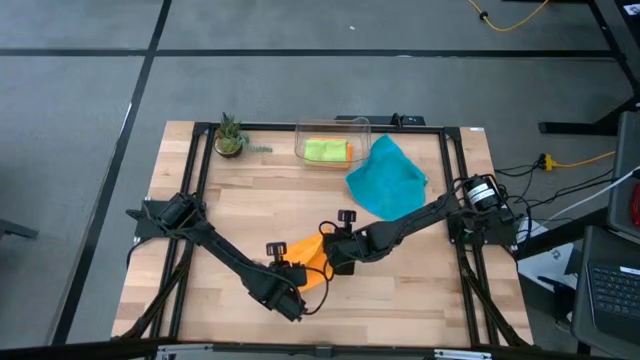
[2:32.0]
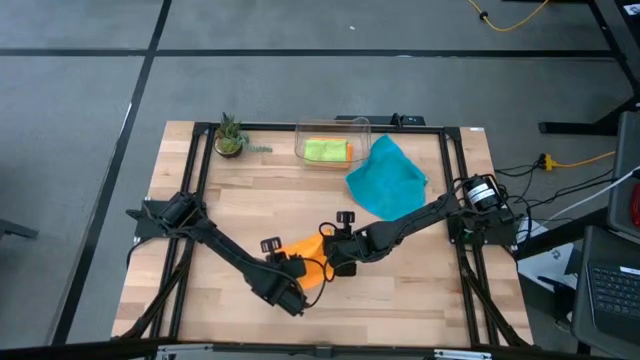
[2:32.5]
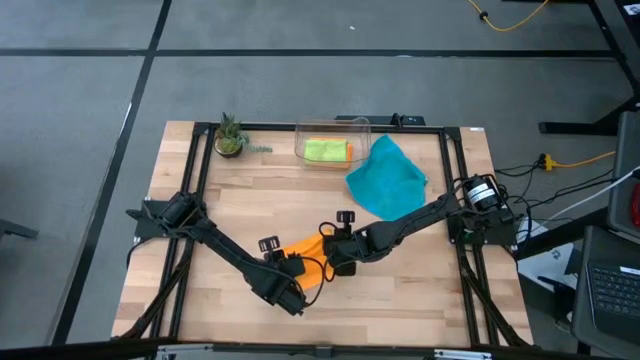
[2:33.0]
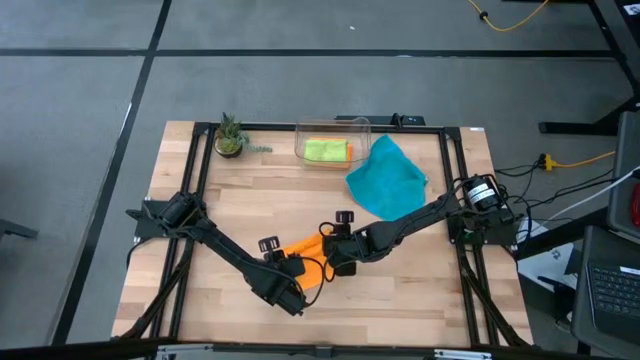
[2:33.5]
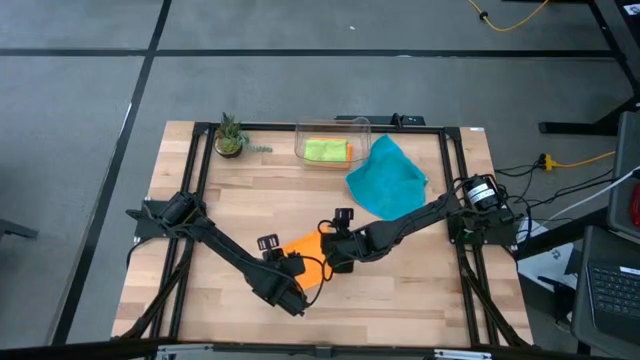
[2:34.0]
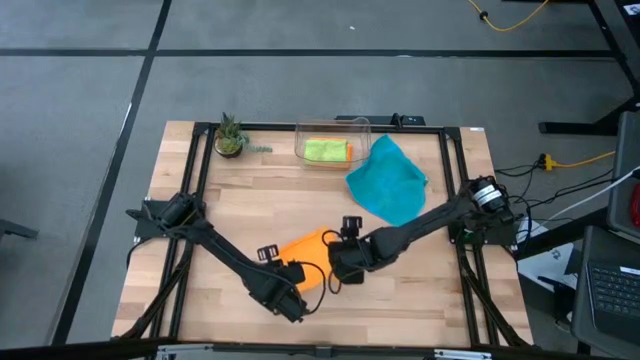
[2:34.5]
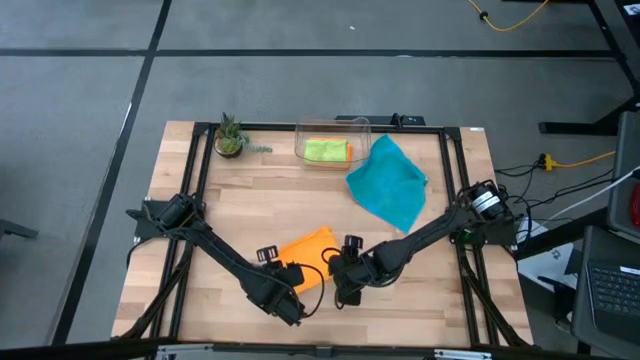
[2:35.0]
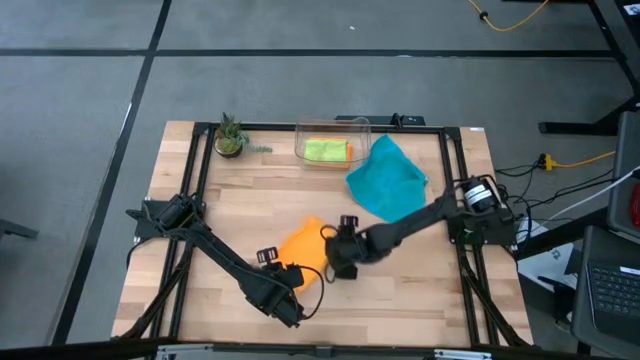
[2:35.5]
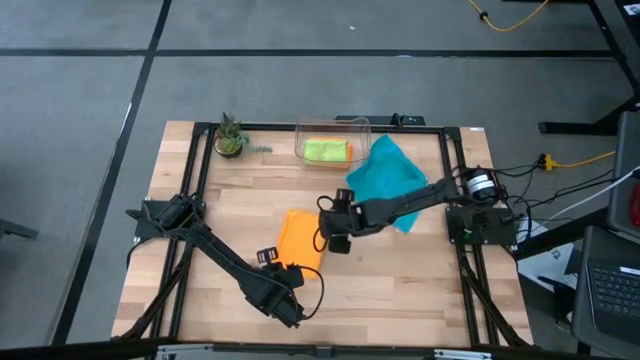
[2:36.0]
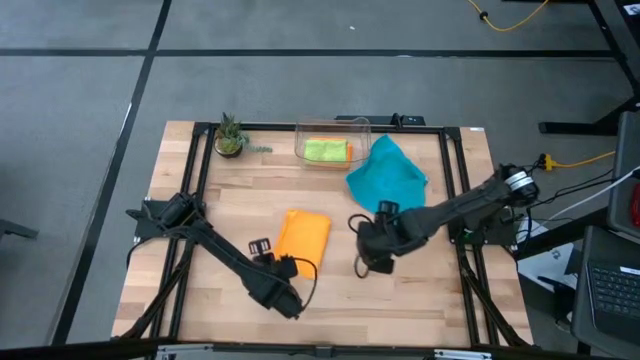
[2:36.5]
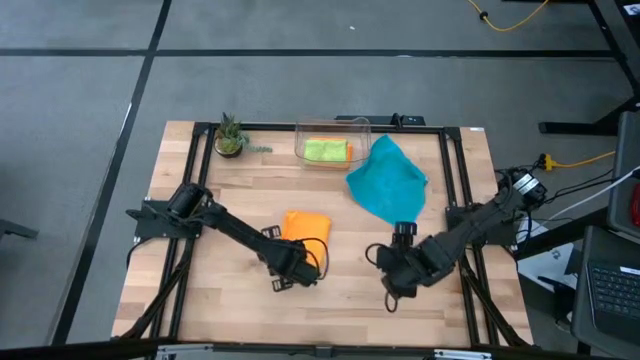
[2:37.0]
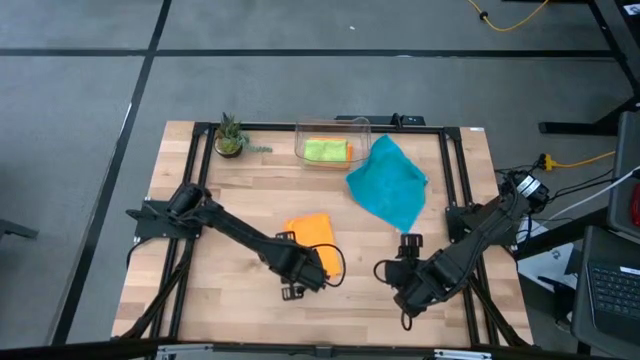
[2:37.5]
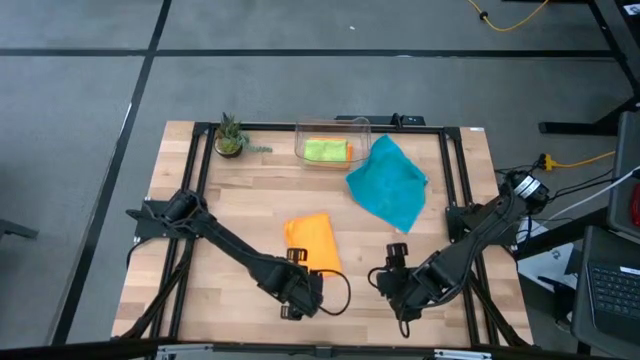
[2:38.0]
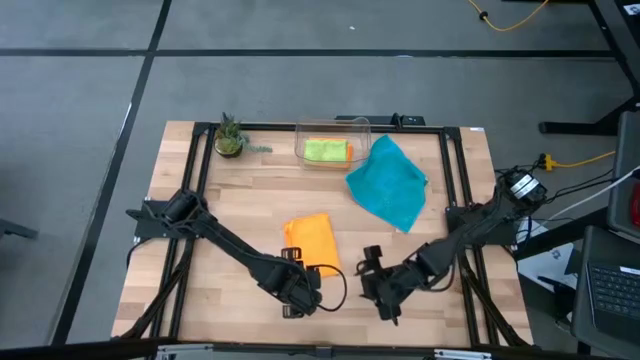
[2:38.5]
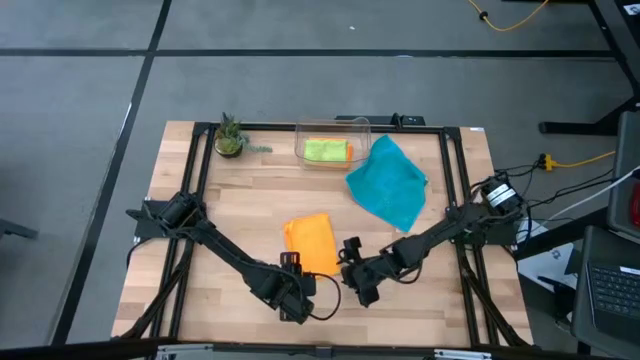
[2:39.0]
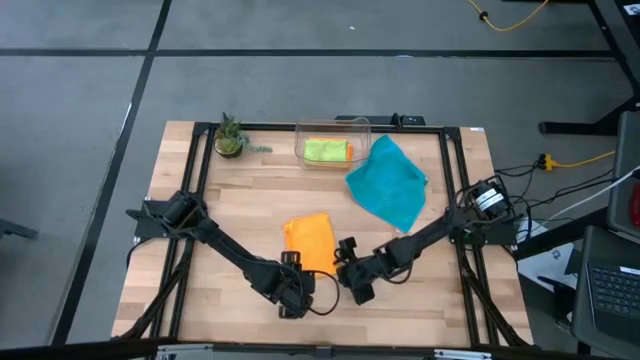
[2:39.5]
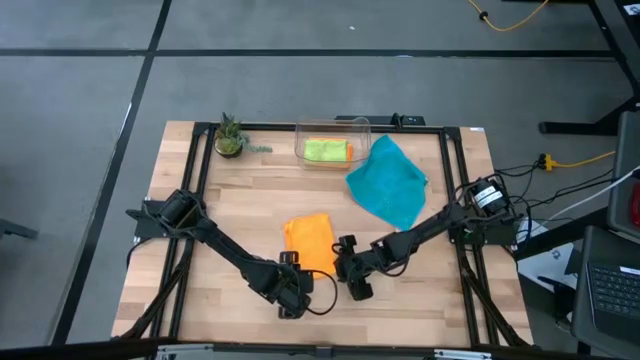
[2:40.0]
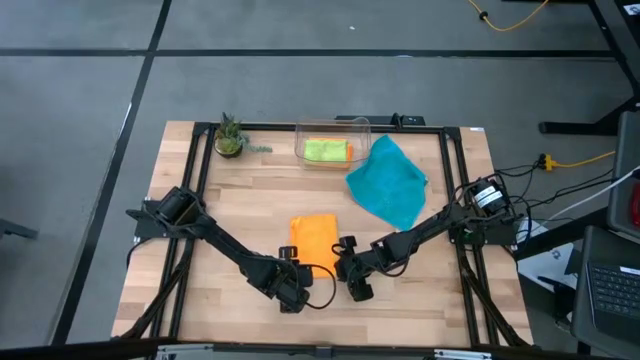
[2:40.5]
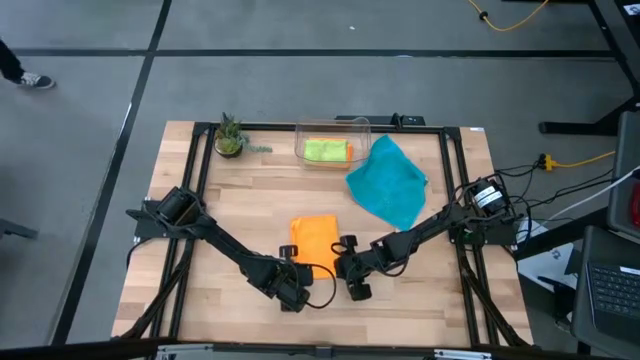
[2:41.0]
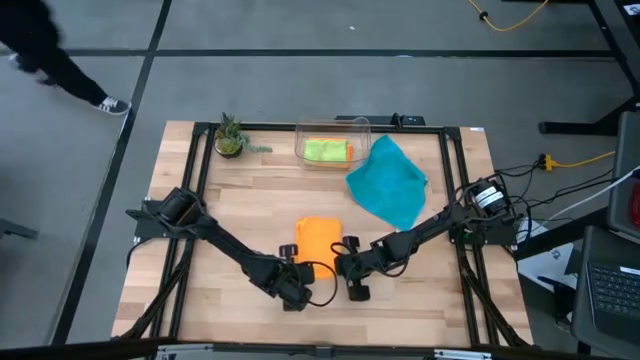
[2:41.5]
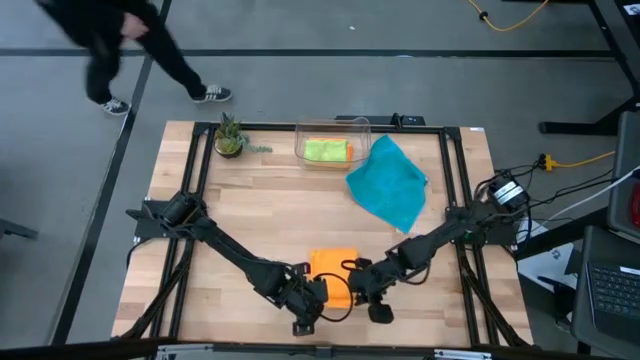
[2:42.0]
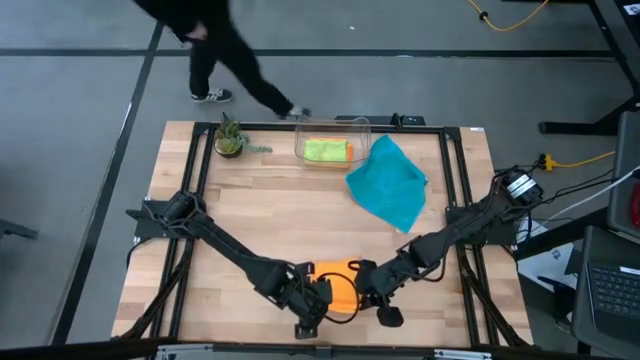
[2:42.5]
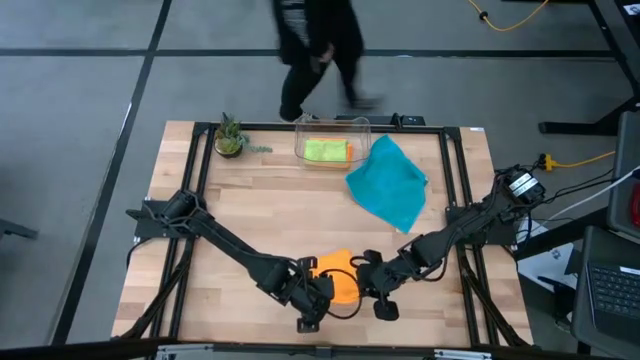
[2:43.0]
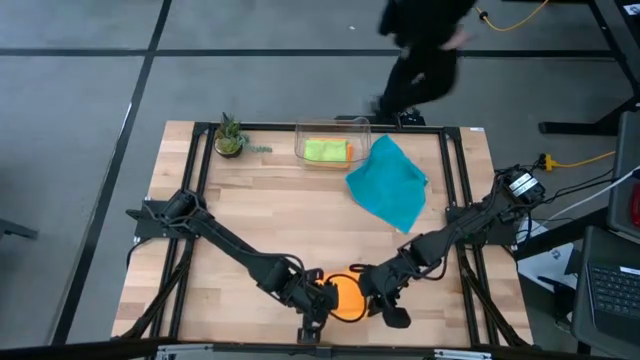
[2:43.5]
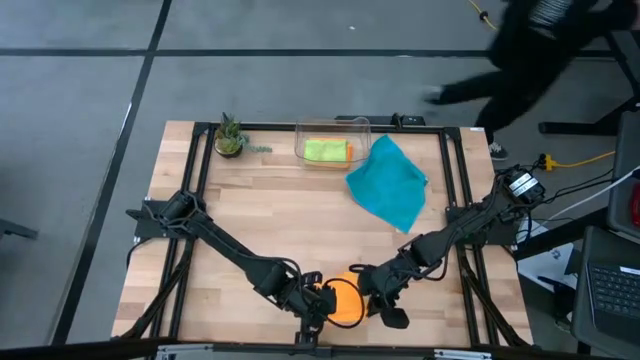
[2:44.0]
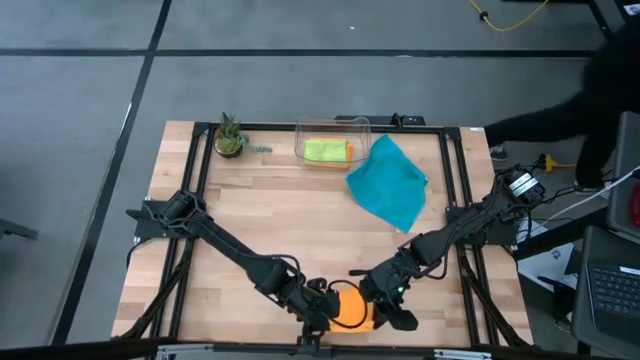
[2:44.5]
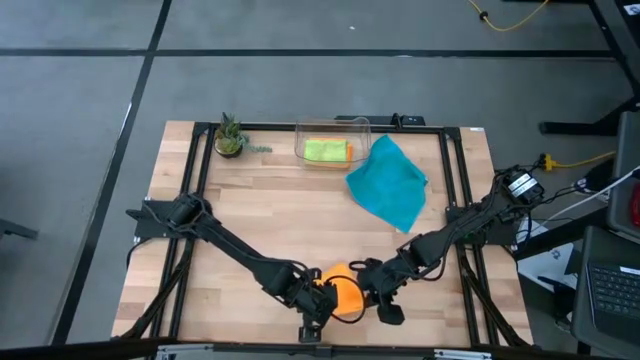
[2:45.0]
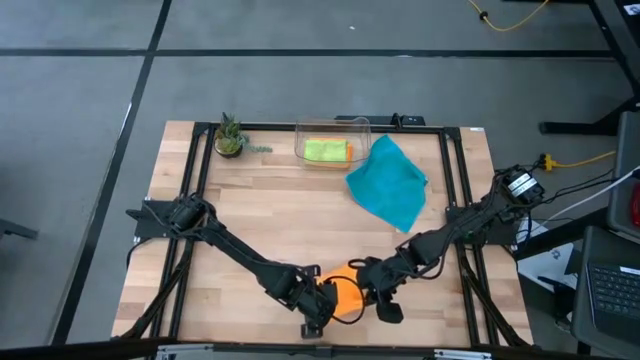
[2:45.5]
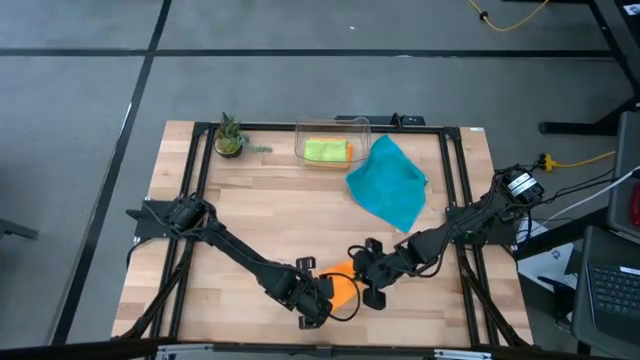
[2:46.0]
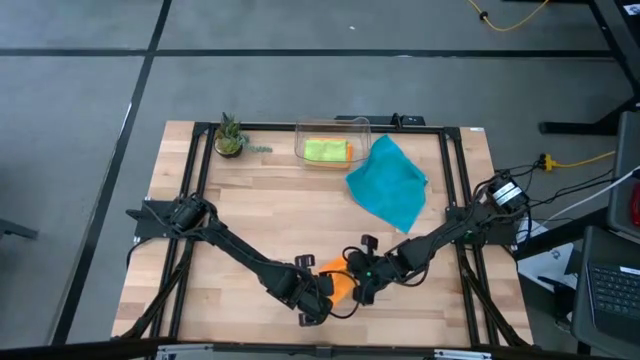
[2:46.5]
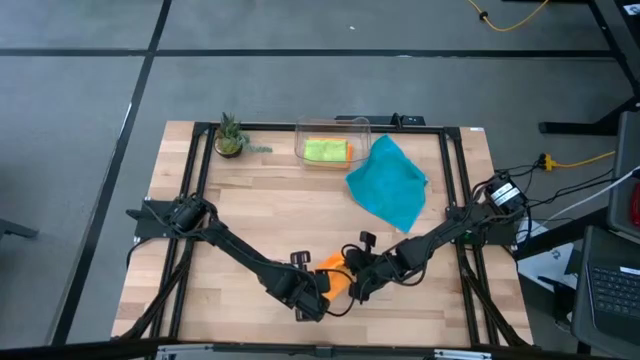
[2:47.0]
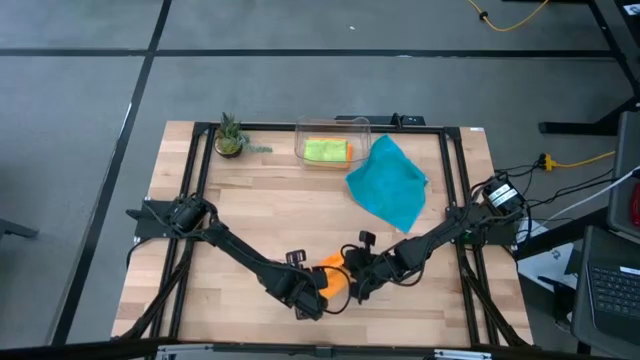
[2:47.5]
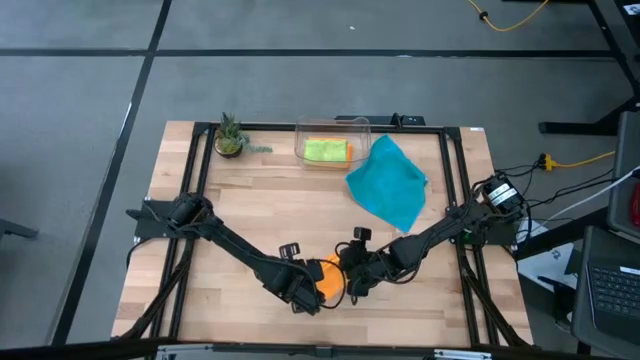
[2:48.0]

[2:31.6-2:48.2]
Task: Fold microfiber towels
Fold the orange microfiber cloth

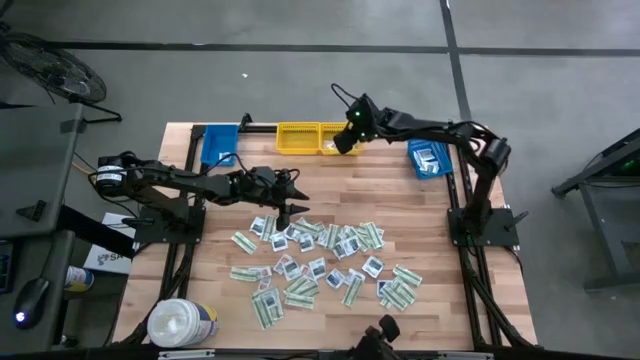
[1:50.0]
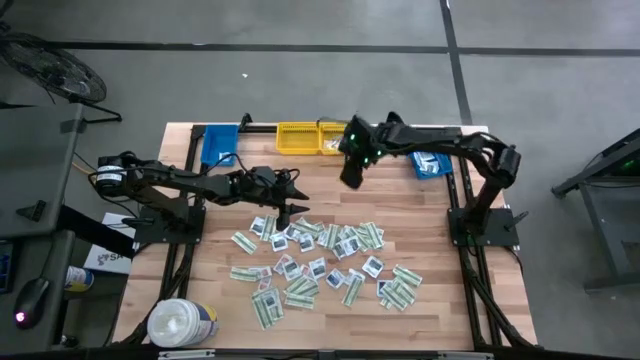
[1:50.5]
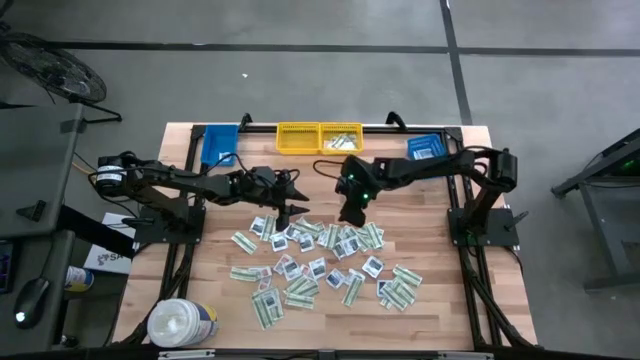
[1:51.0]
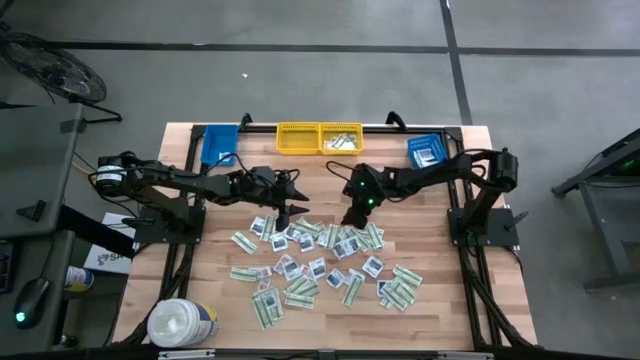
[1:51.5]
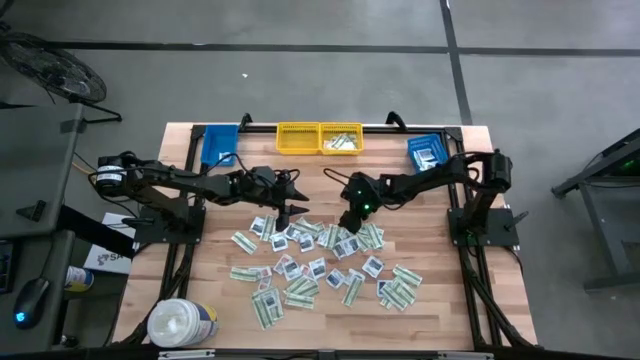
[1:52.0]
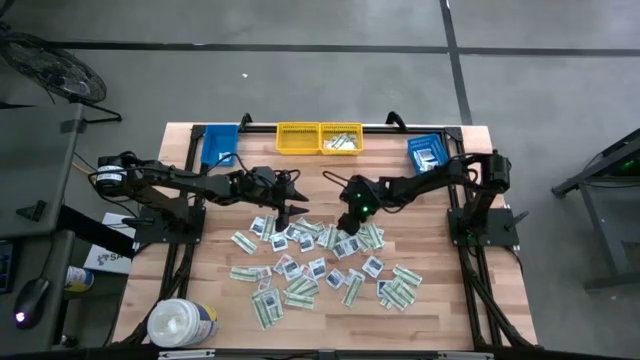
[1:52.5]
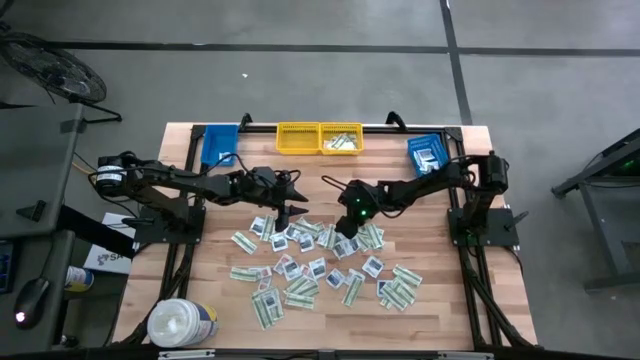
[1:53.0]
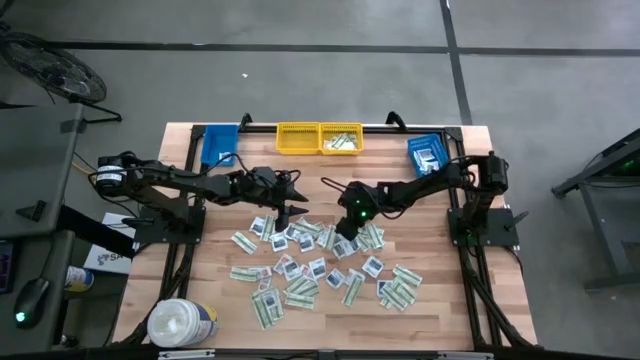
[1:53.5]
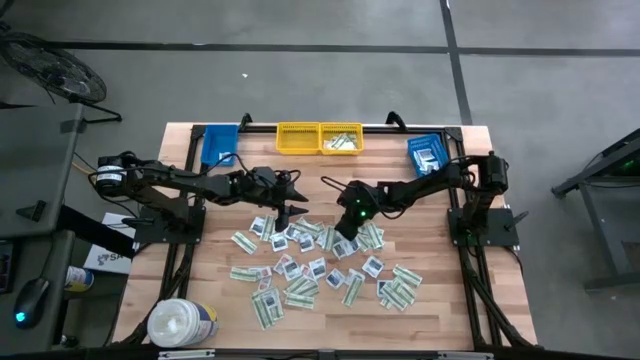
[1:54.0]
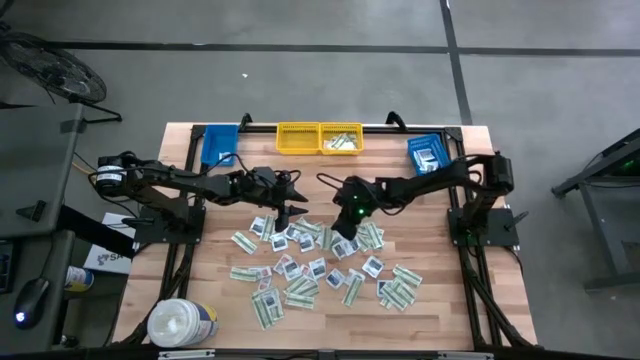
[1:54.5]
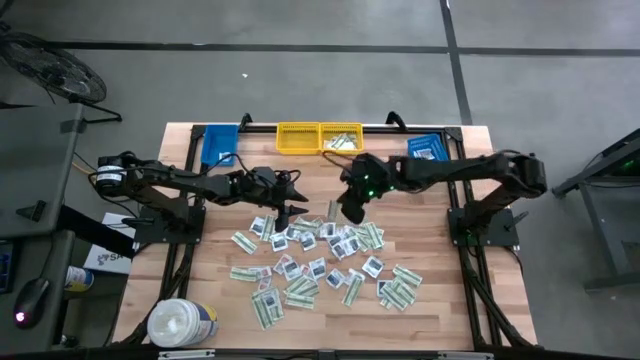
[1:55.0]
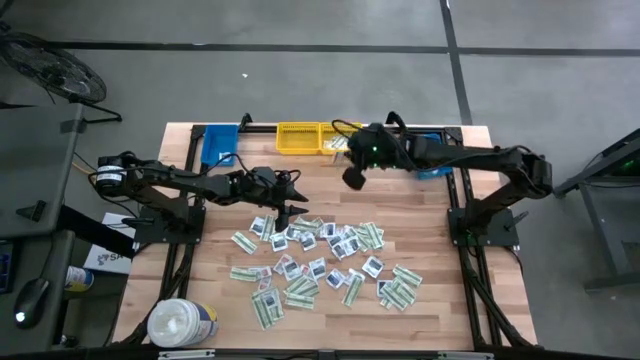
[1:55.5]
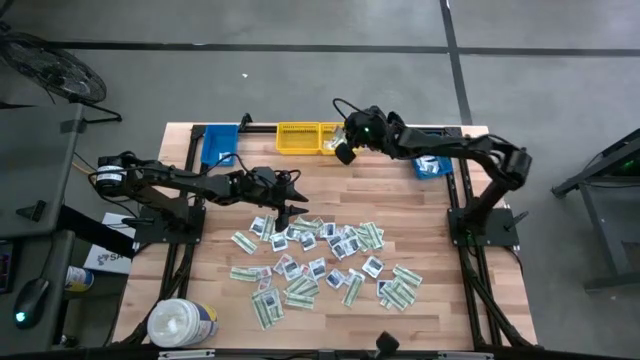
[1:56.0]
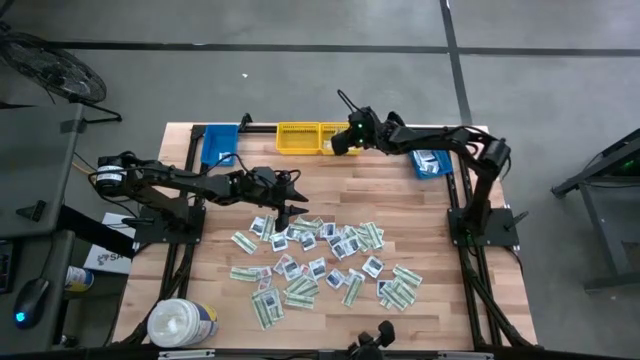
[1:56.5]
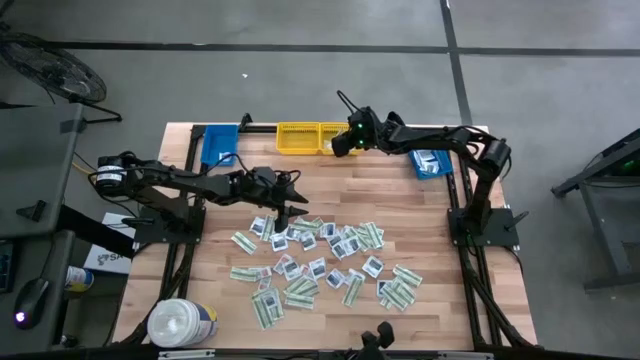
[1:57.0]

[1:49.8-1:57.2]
Task: Pick & Place First Aid Supplies
Put the green bandage pack into the right yellow bin
